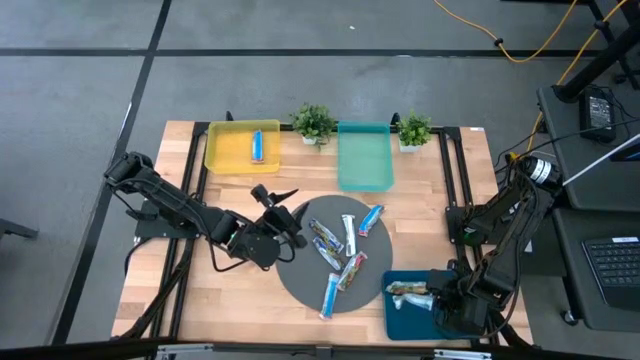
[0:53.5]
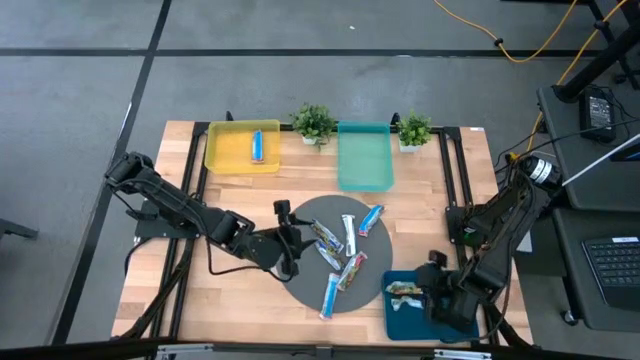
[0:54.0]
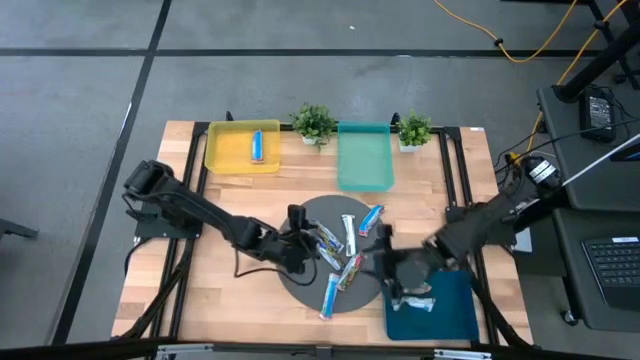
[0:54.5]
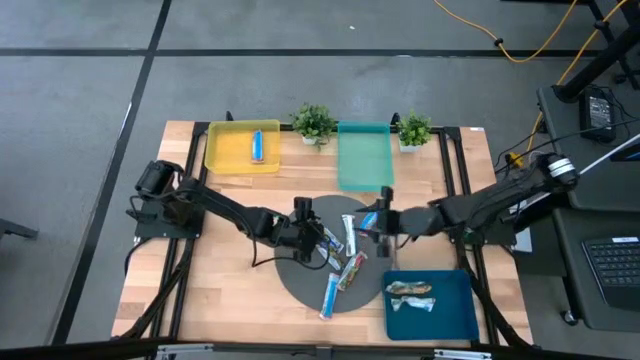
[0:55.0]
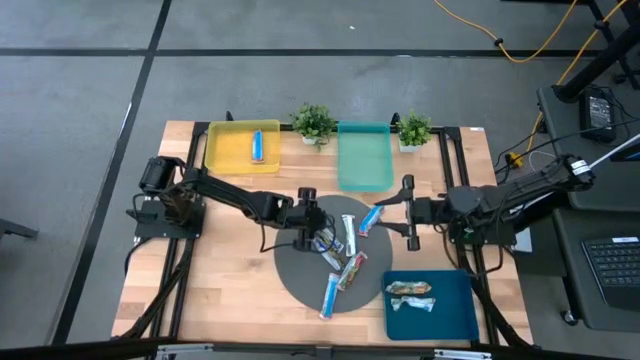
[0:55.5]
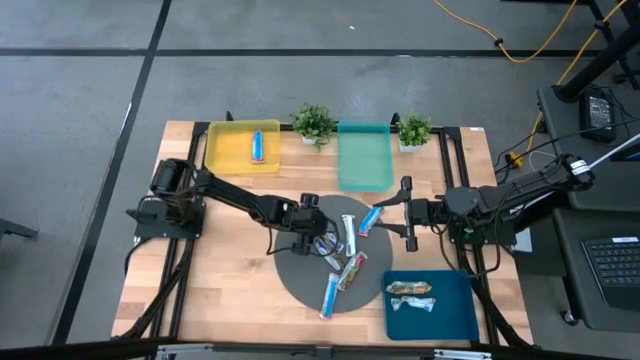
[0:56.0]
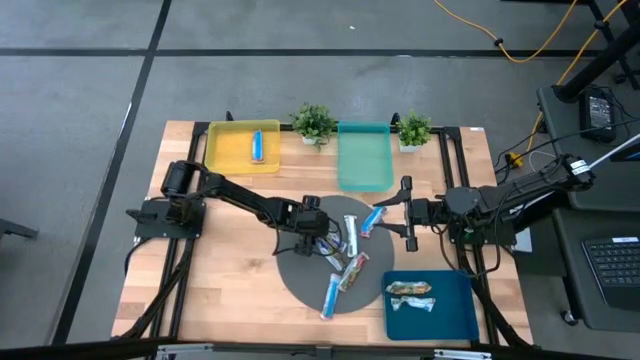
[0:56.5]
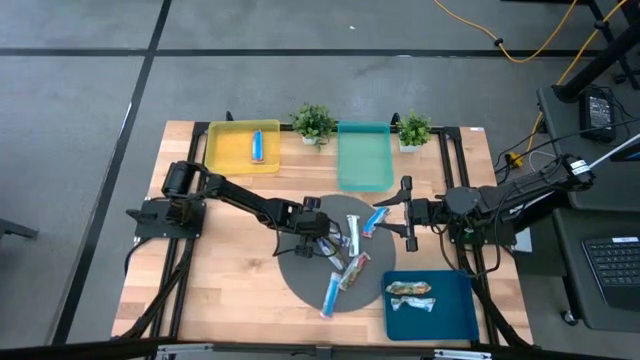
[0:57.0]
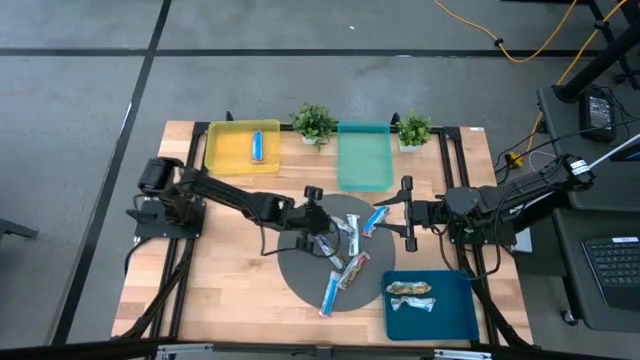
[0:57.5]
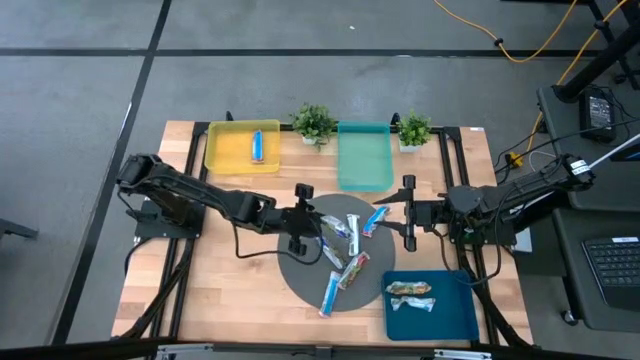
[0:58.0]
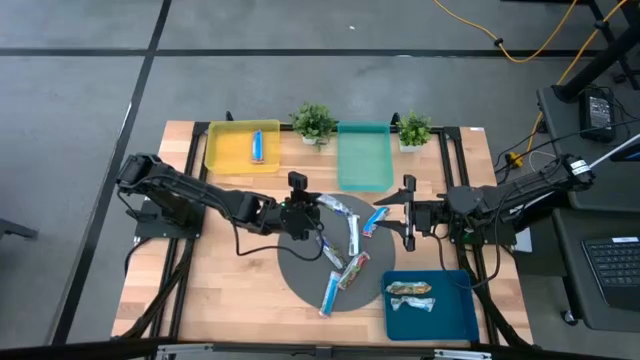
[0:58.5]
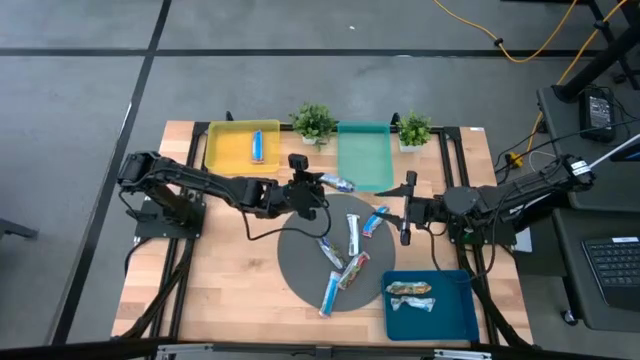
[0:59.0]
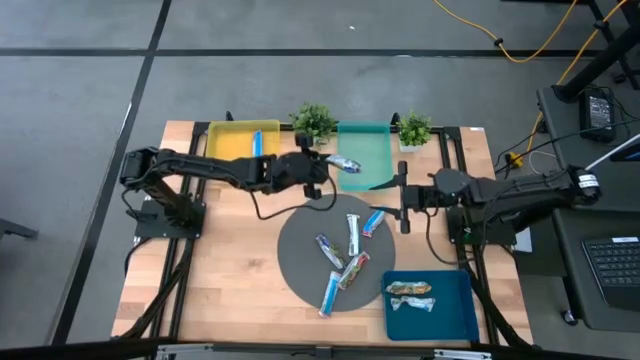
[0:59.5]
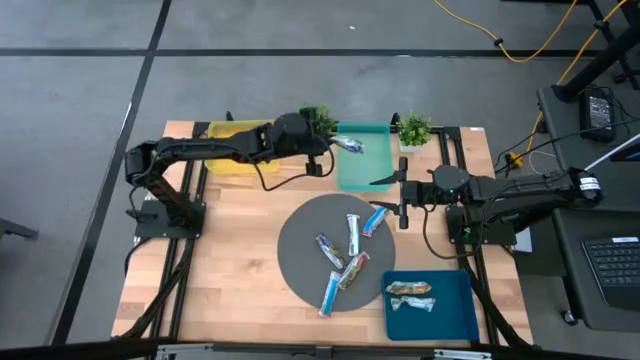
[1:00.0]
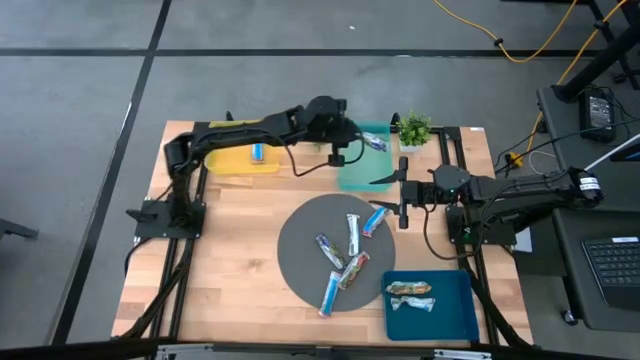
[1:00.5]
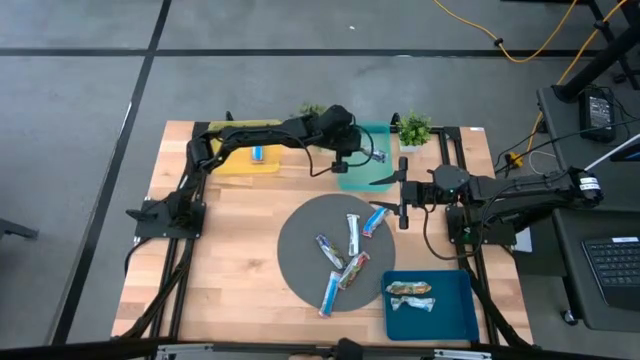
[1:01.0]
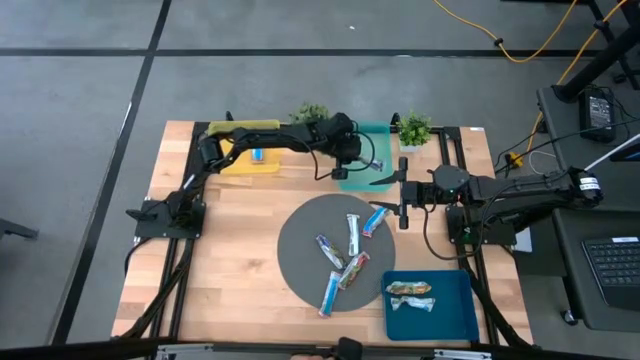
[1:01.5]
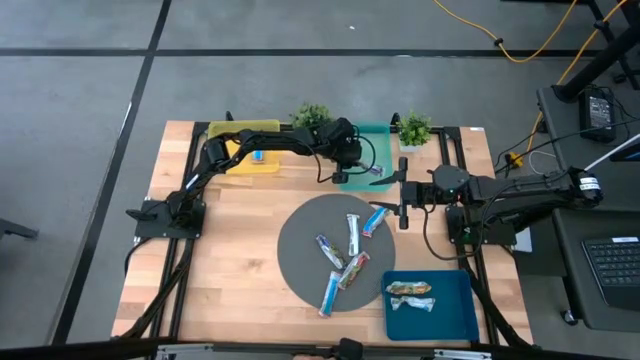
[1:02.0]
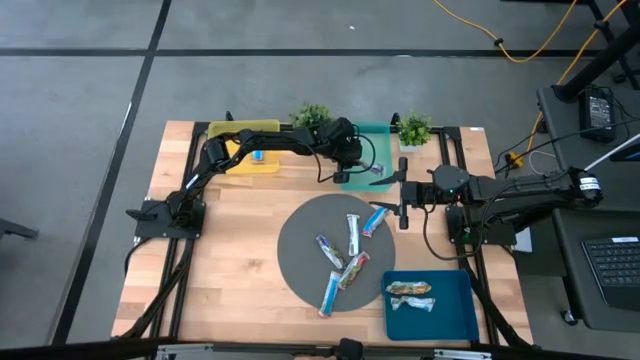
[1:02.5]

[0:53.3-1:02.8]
Task: Pick and place Granola Bars by type
Put the blue granola bar into the light green bin

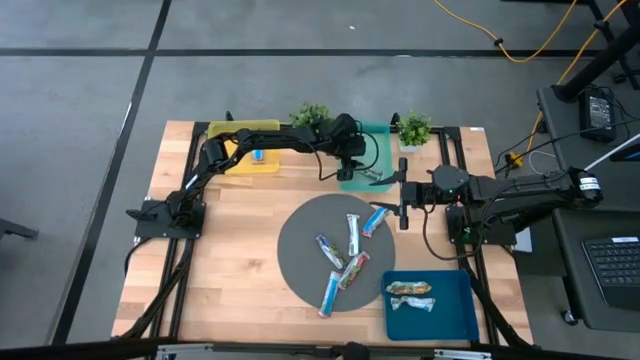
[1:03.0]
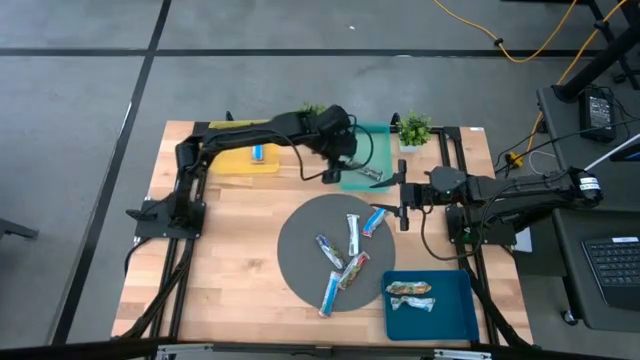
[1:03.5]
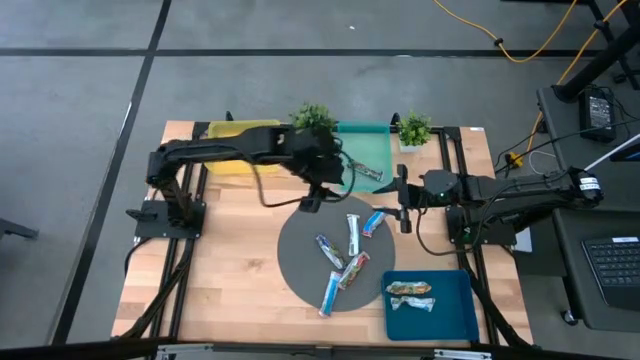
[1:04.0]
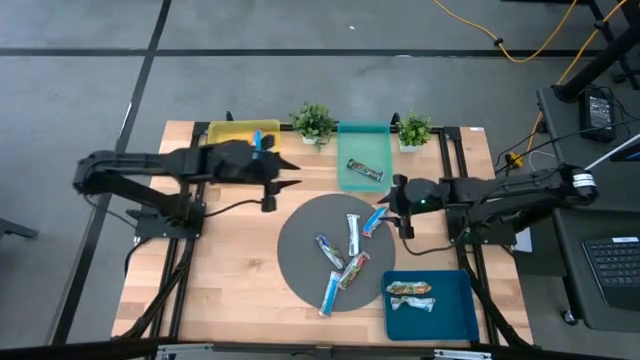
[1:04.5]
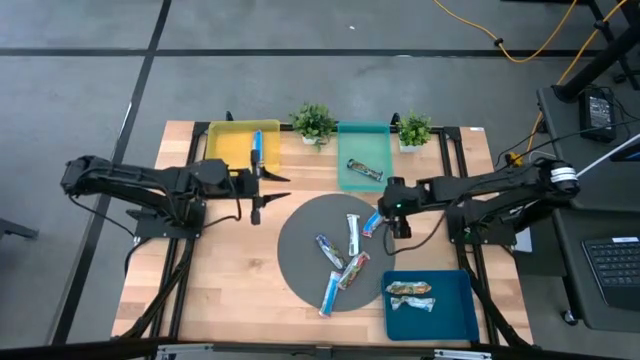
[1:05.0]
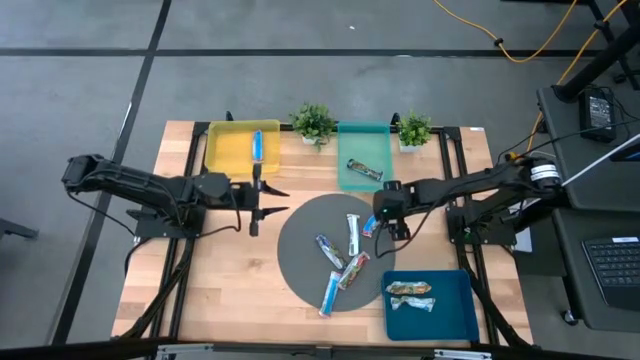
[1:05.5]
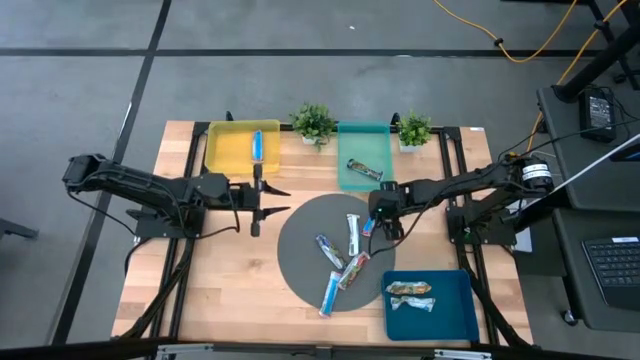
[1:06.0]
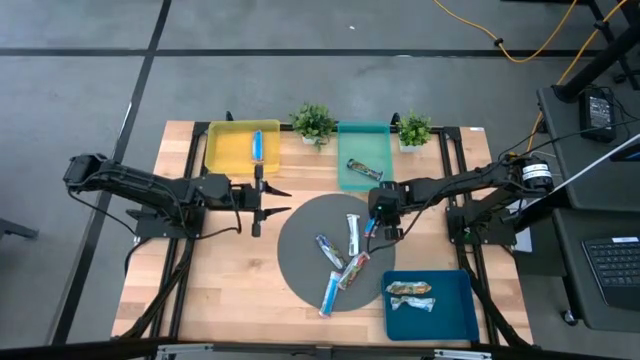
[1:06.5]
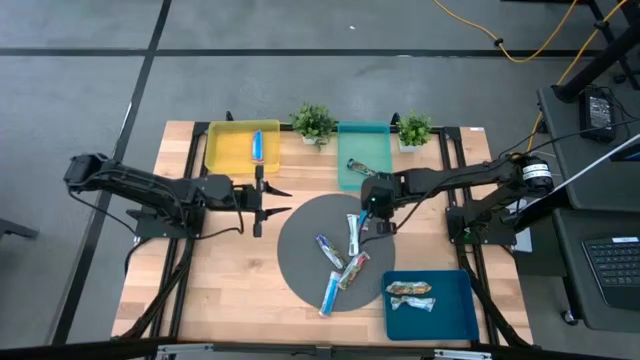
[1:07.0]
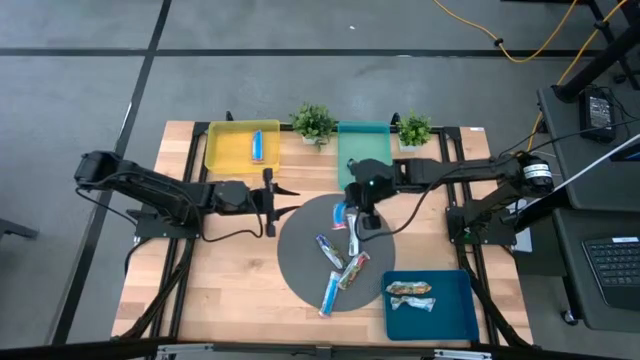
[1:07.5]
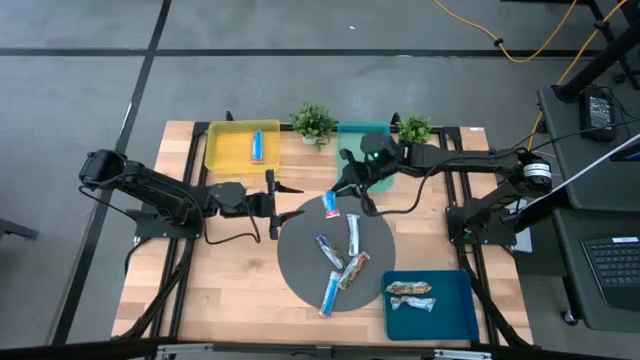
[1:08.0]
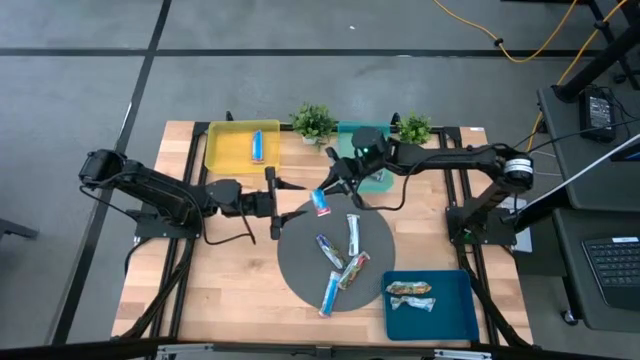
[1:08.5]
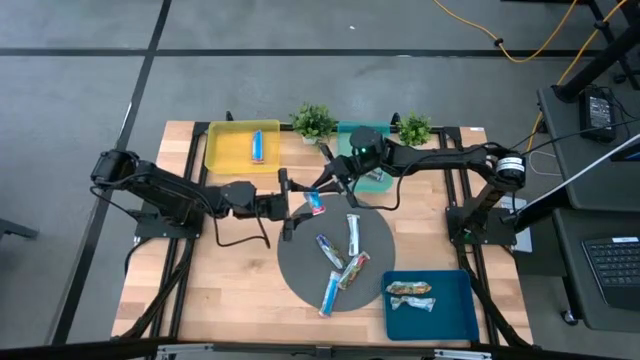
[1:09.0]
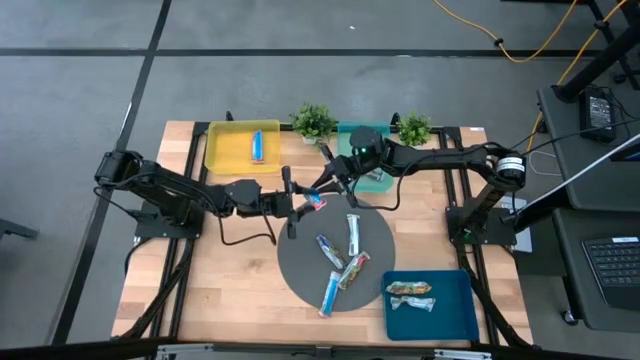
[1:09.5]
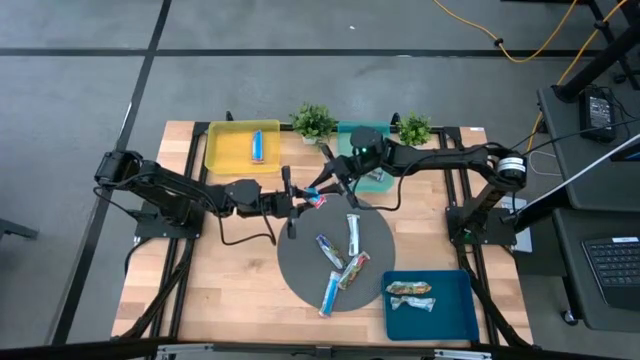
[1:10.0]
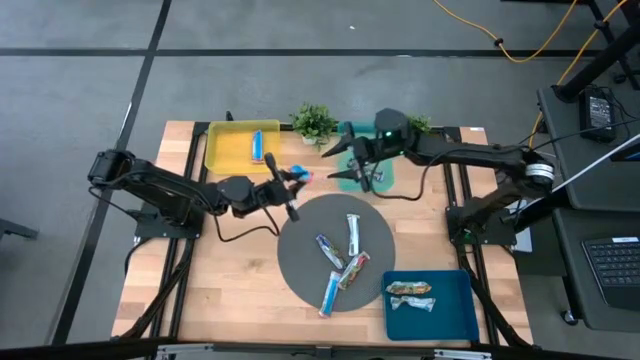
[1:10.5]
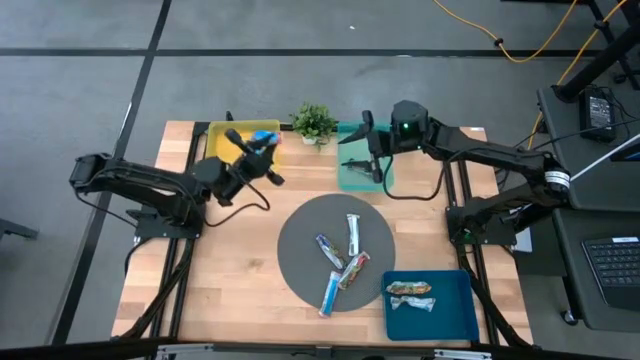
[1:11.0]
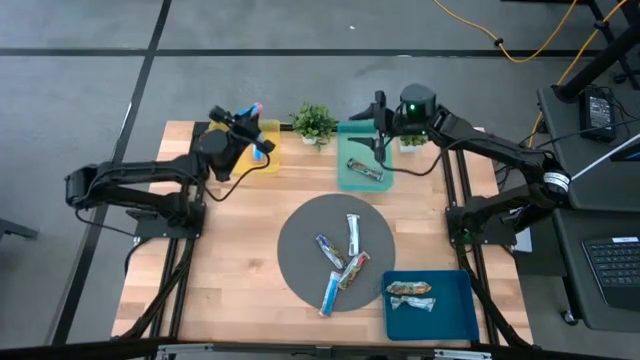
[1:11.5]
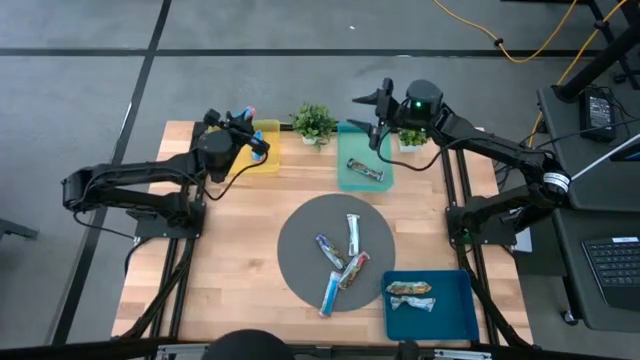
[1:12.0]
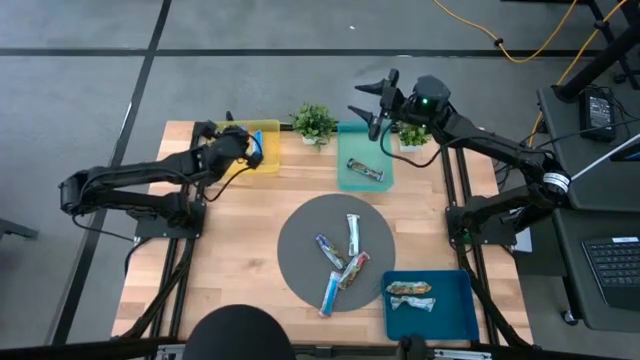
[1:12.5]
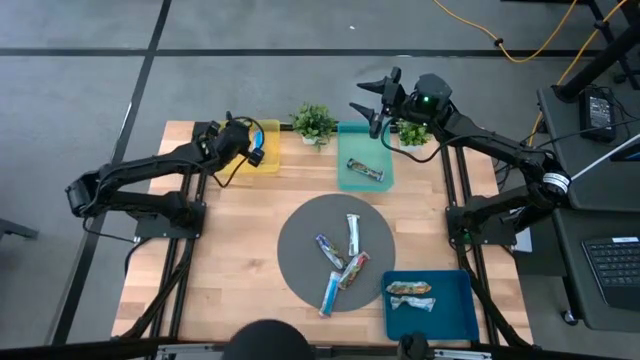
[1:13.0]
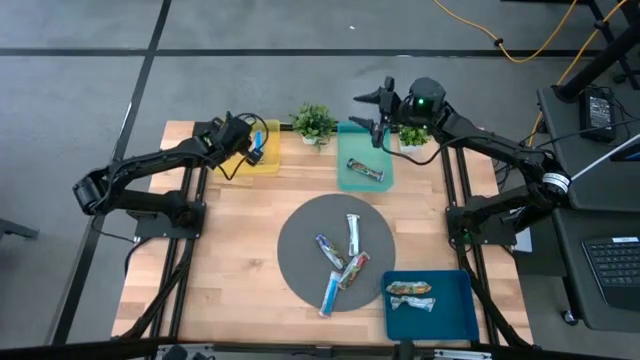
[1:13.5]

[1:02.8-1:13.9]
Put the red granola bar into the yellow bin

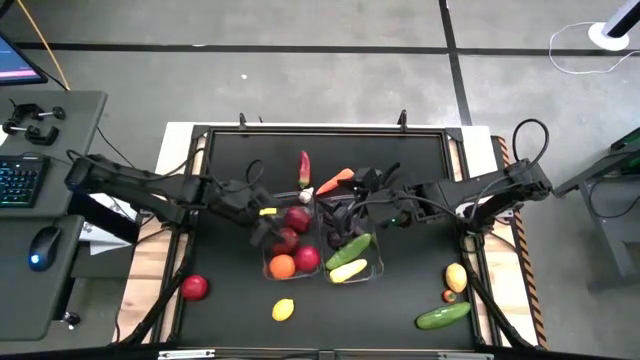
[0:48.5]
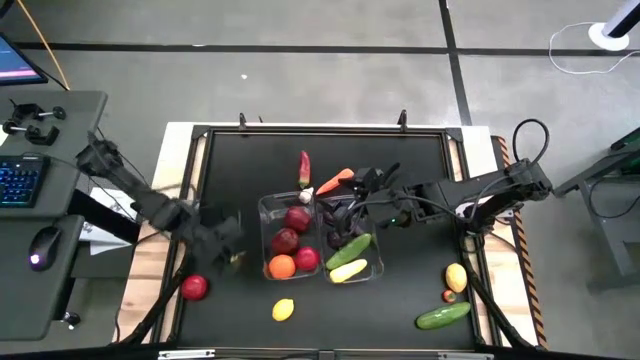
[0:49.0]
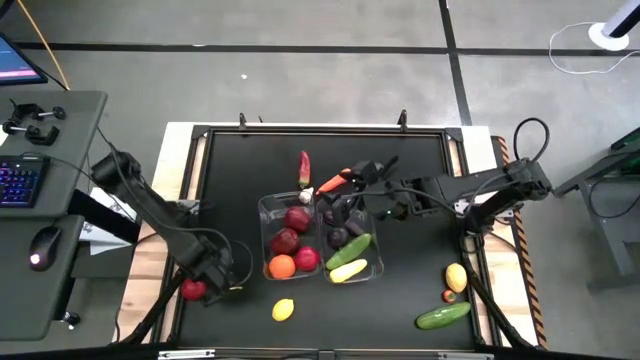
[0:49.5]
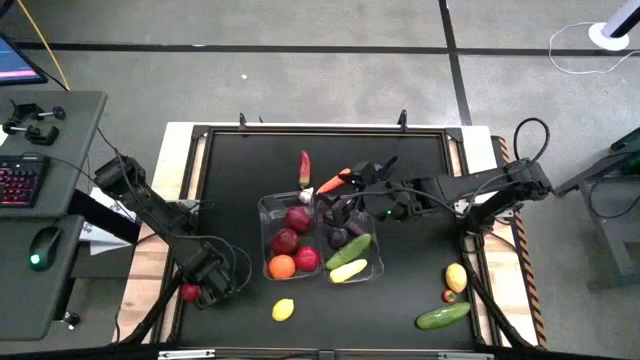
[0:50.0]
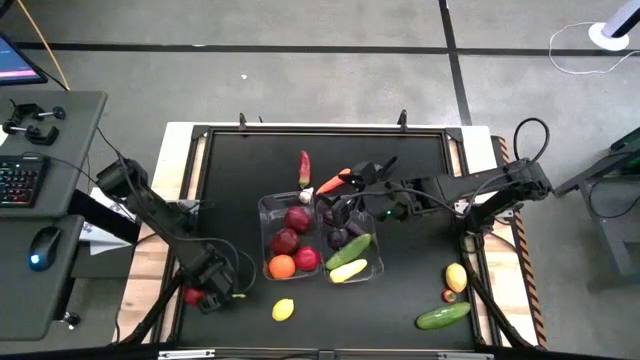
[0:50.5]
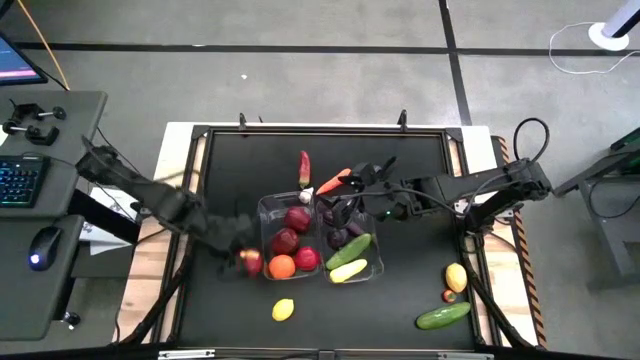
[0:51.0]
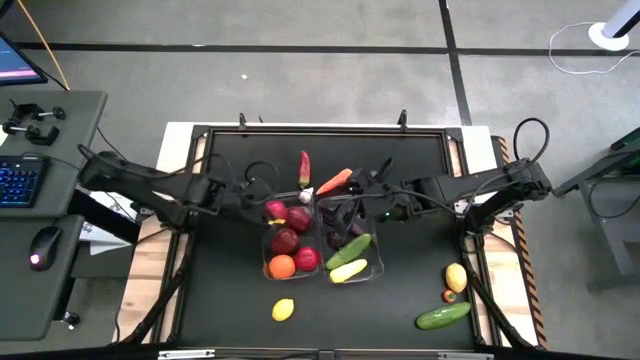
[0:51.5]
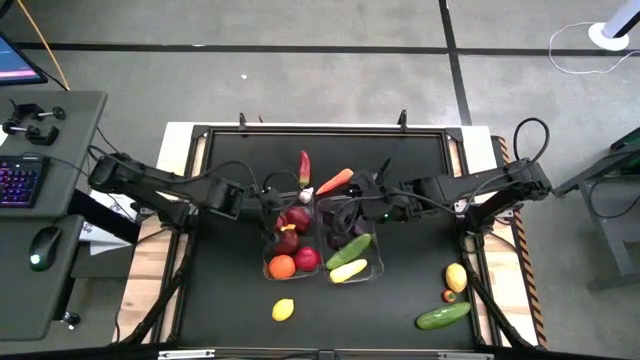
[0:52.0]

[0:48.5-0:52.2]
Task: Sort produce into baskets
Put the tomato into the left transparent bin
